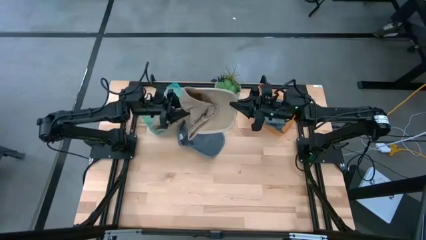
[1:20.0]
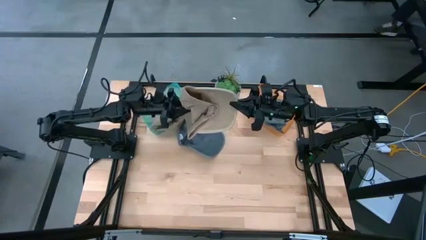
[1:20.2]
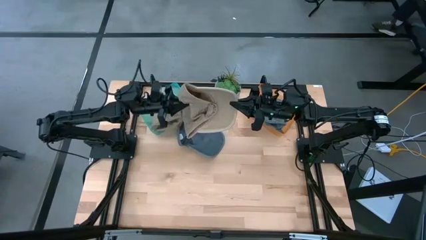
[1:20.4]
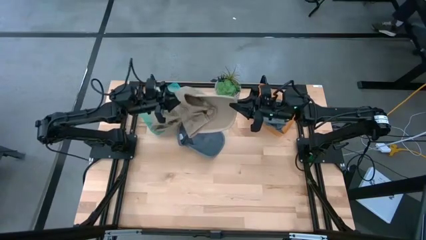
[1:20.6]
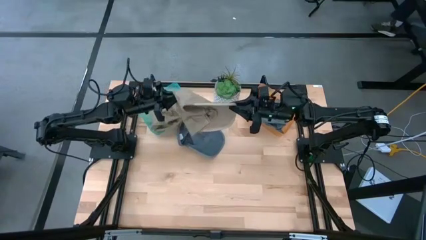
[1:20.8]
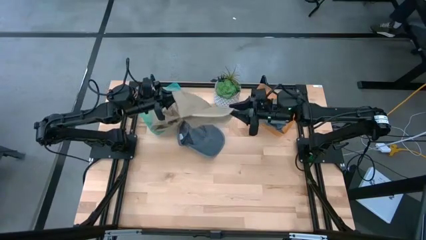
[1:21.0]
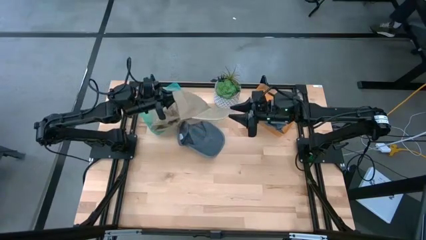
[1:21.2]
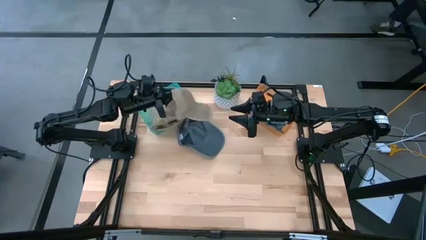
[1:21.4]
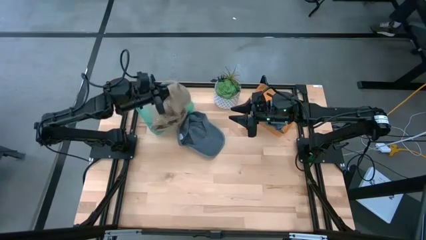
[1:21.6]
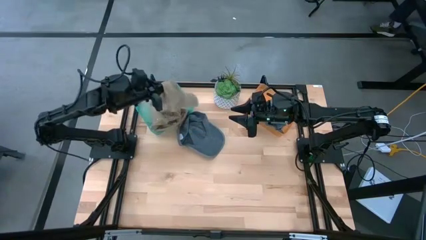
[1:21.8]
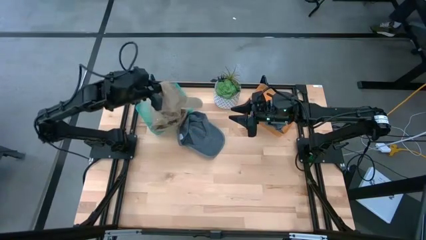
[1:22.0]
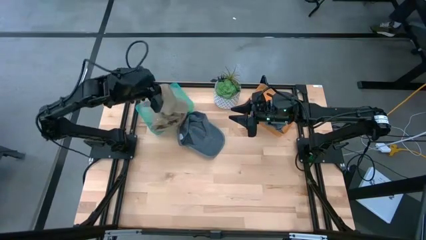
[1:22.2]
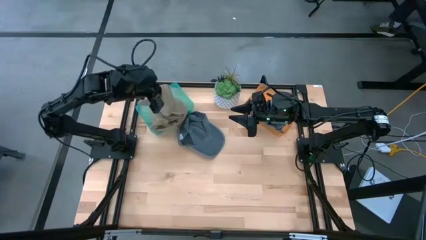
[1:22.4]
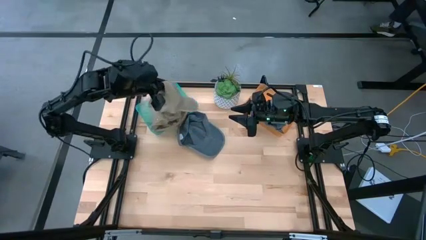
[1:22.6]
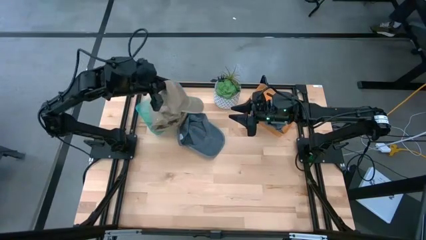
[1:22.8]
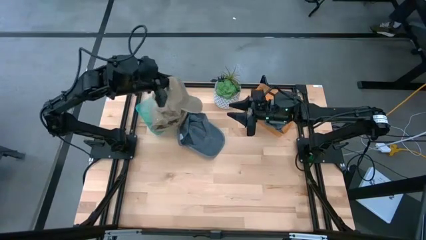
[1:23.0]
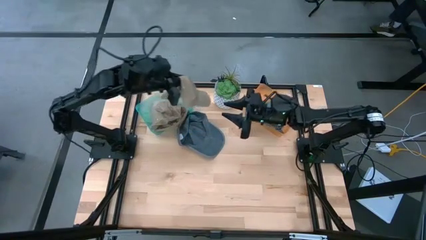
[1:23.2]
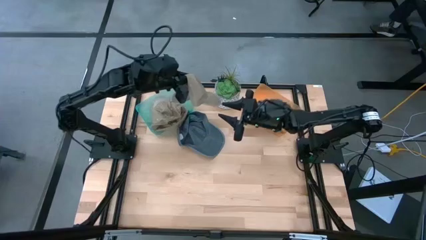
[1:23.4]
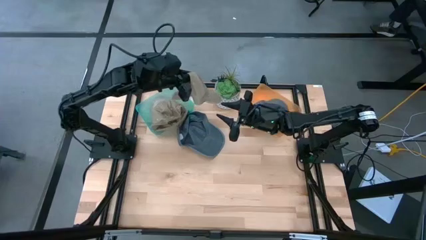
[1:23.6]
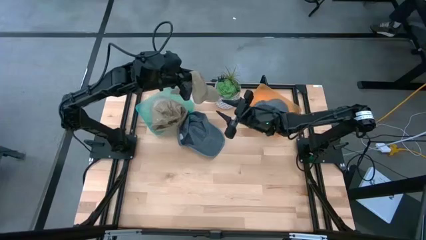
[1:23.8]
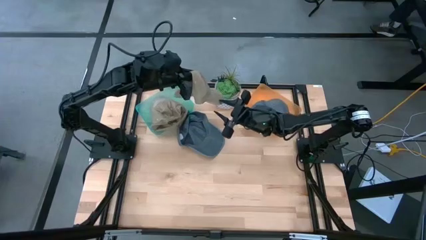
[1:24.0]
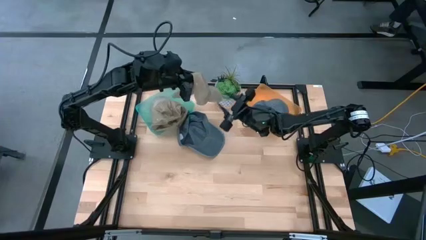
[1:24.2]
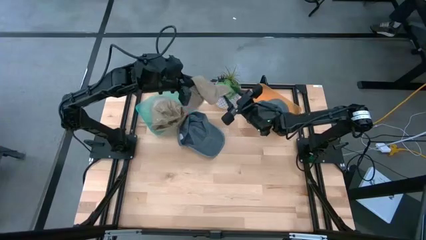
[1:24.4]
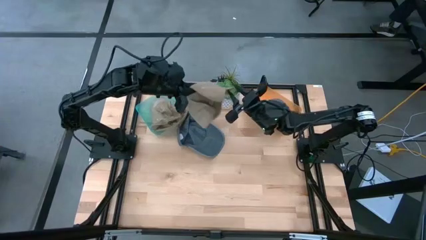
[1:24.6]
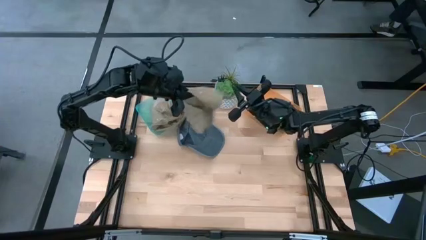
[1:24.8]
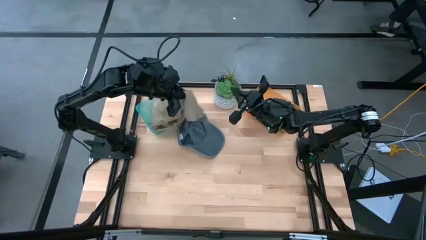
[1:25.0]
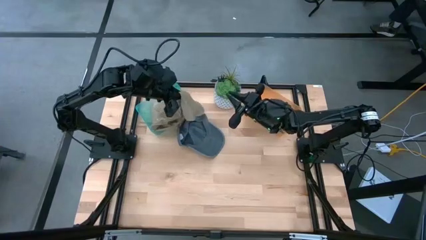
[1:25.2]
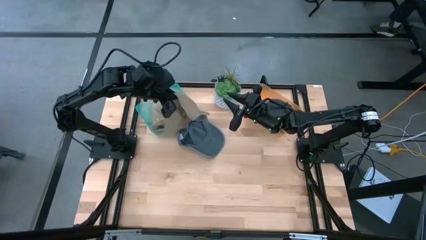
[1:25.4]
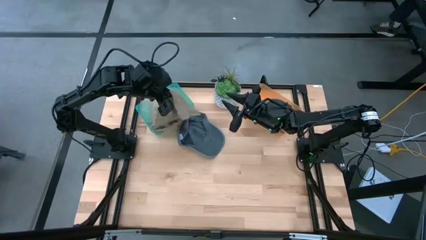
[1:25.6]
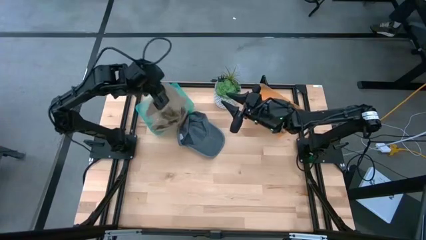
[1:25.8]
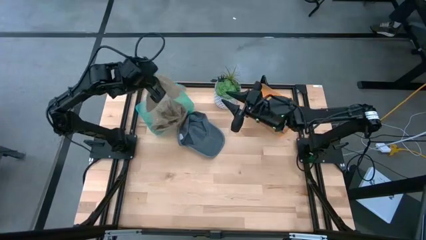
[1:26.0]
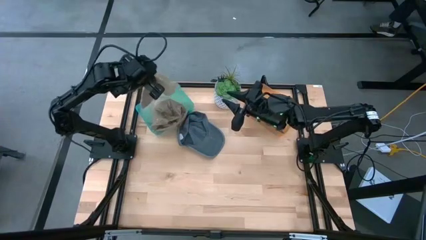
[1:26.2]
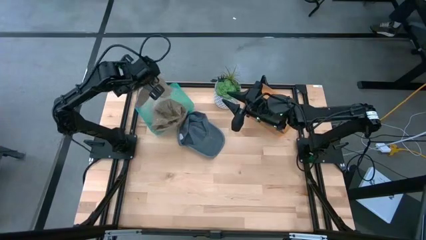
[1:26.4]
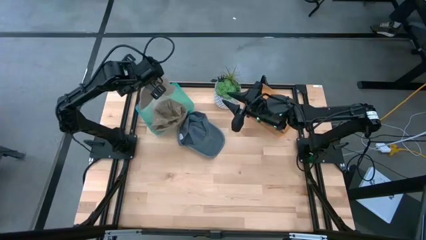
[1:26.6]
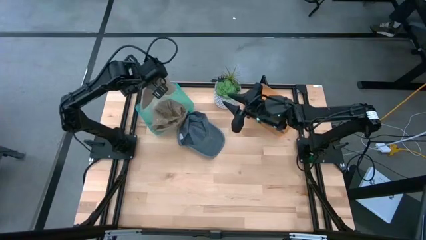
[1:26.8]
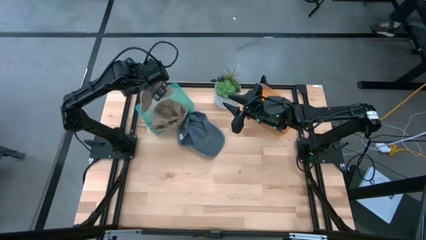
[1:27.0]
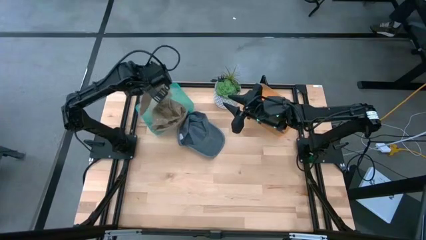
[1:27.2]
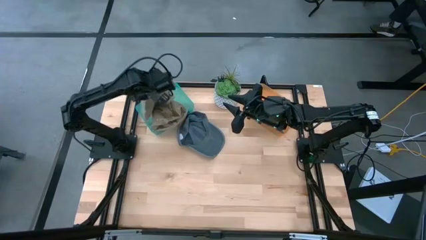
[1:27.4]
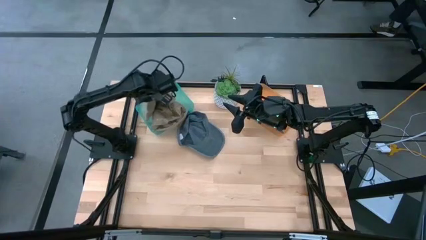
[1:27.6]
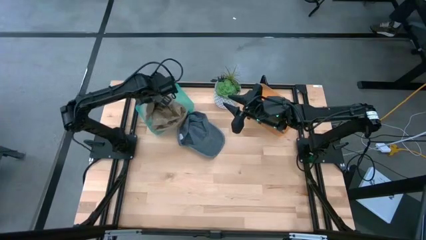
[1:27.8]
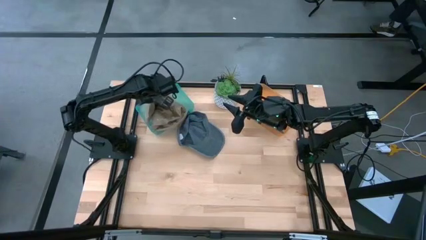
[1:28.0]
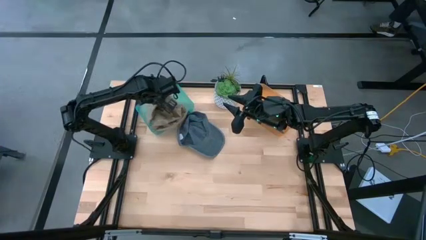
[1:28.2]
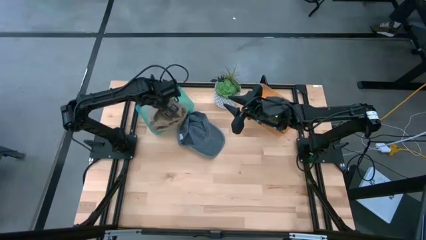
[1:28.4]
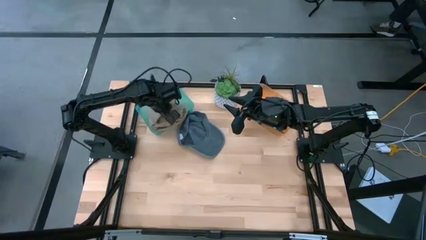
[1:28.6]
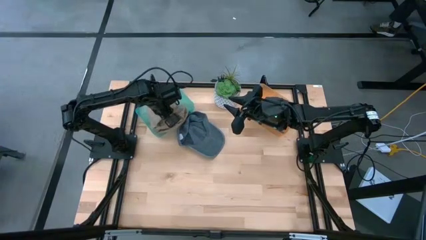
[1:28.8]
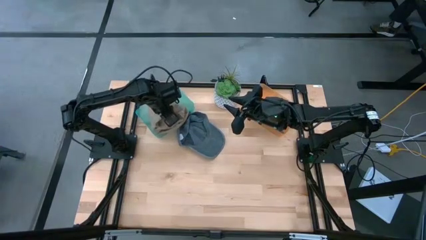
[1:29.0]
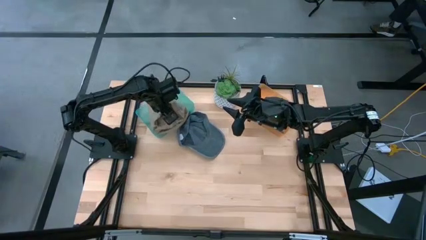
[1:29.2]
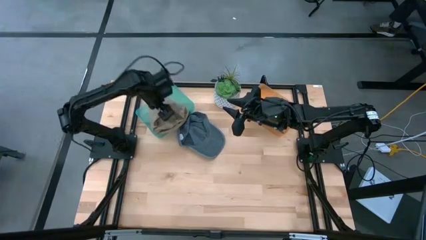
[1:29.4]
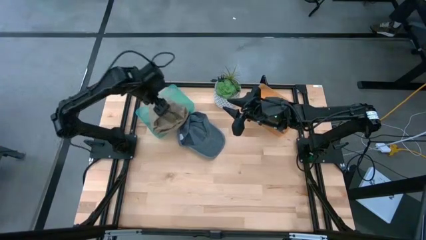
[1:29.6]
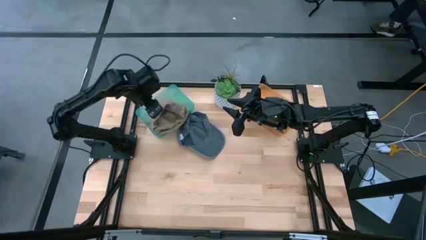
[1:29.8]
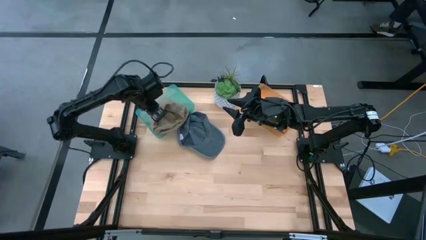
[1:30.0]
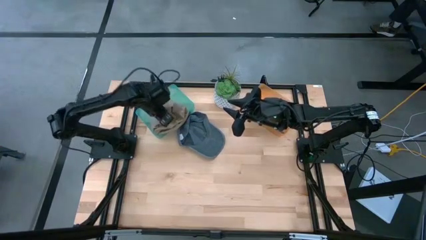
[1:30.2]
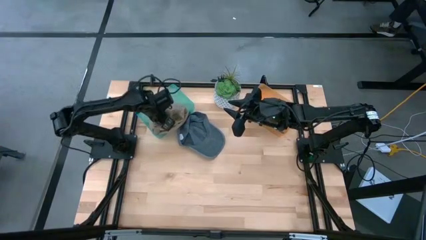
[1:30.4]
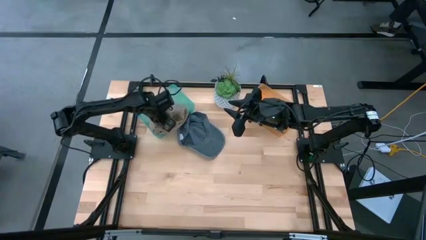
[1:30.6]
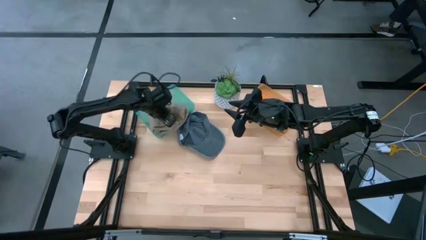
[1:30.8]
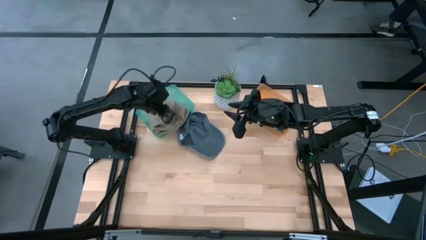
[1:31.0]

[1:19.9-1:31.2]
Task: Pick & Place hat
Put the brown cap into the green bin
